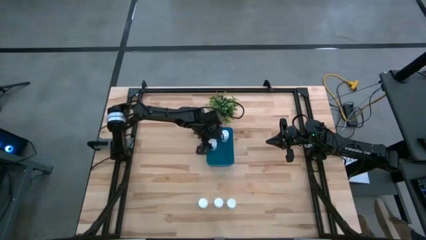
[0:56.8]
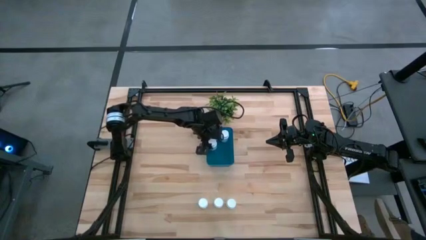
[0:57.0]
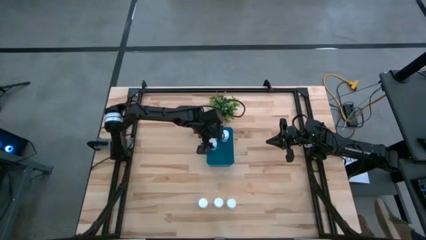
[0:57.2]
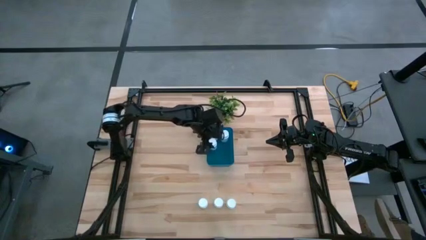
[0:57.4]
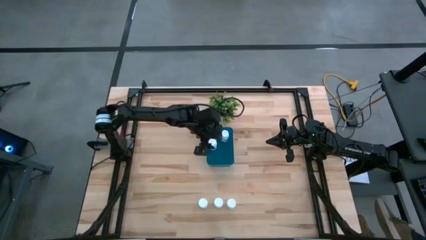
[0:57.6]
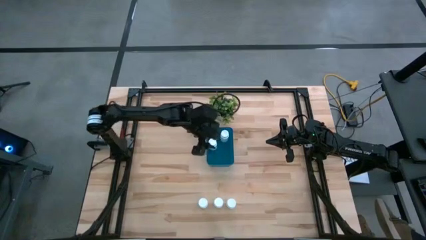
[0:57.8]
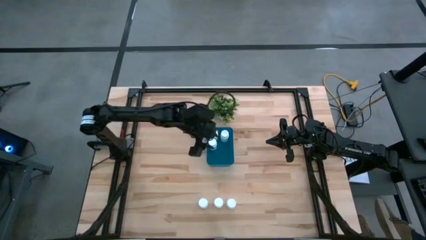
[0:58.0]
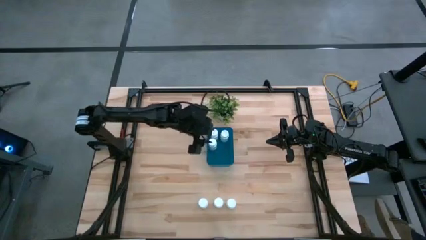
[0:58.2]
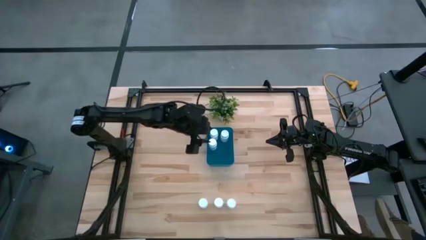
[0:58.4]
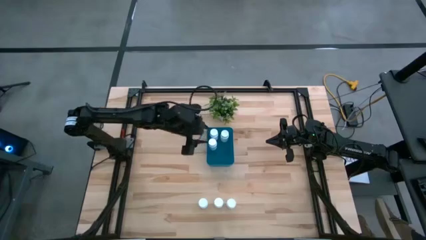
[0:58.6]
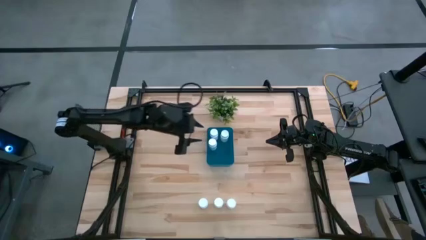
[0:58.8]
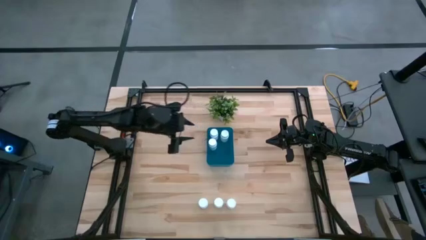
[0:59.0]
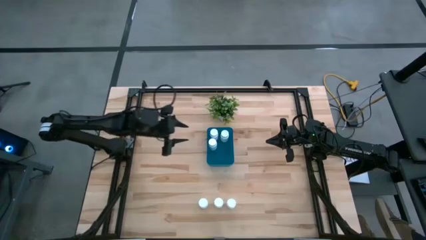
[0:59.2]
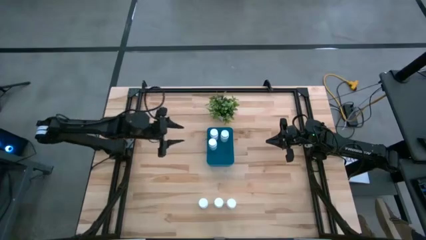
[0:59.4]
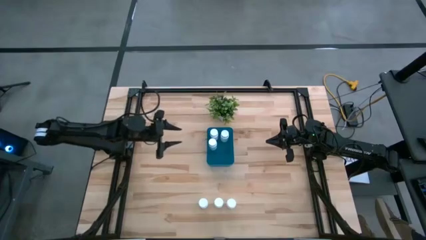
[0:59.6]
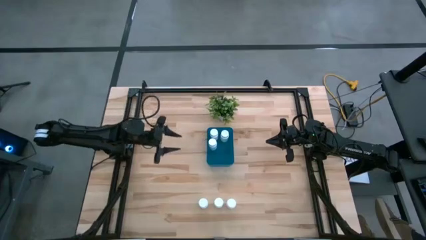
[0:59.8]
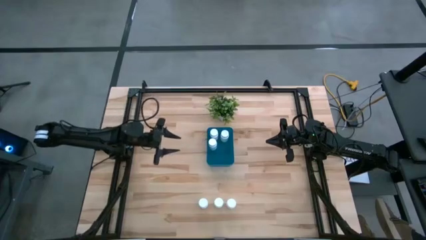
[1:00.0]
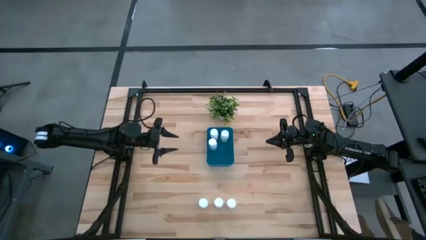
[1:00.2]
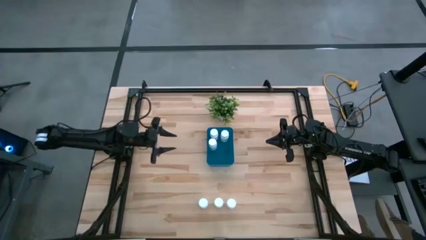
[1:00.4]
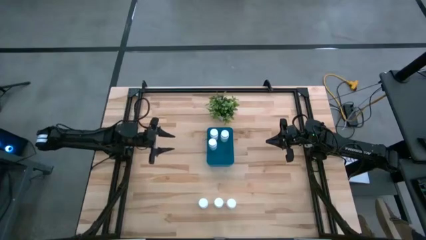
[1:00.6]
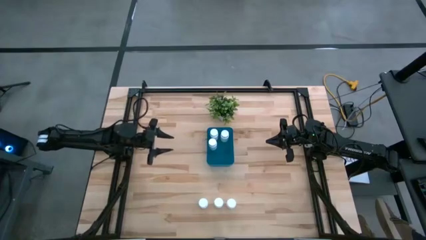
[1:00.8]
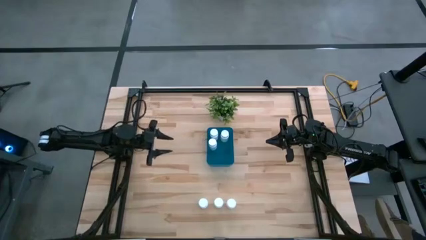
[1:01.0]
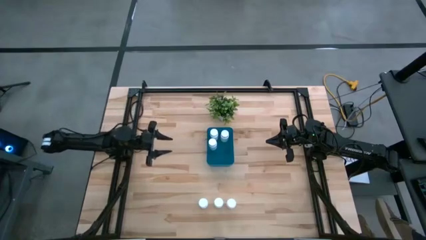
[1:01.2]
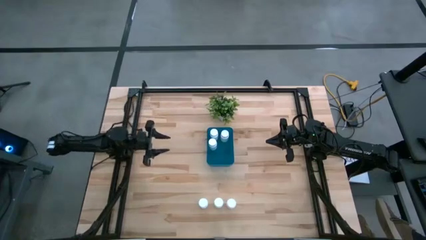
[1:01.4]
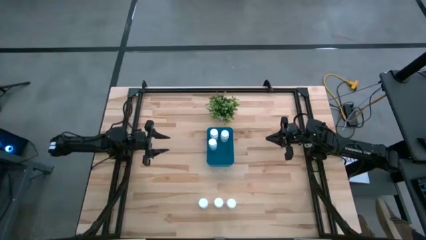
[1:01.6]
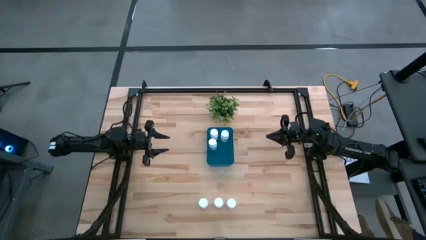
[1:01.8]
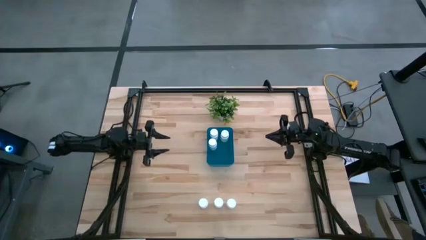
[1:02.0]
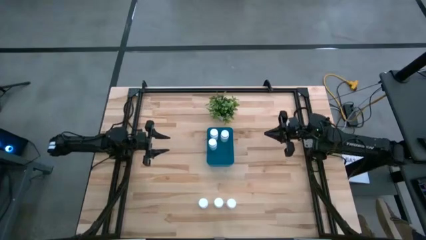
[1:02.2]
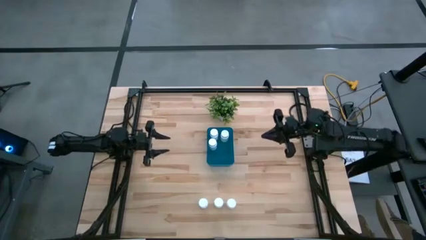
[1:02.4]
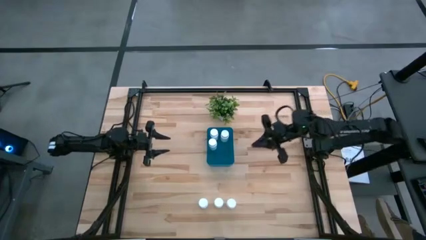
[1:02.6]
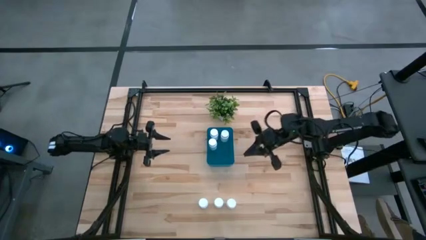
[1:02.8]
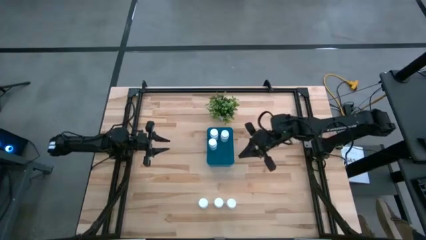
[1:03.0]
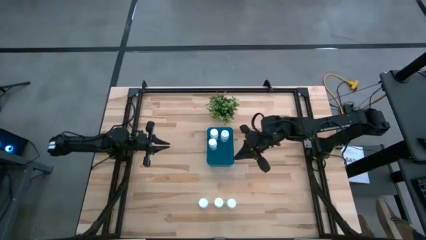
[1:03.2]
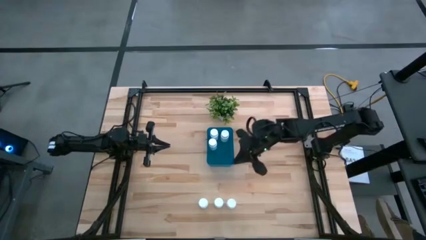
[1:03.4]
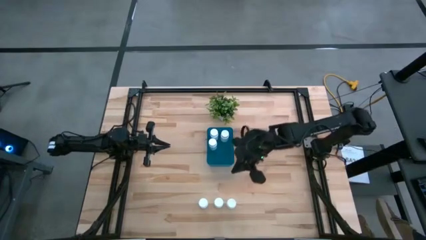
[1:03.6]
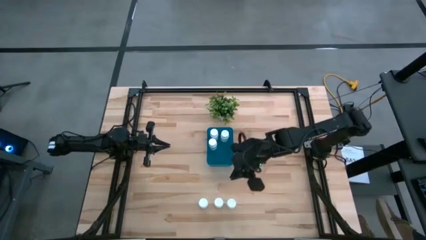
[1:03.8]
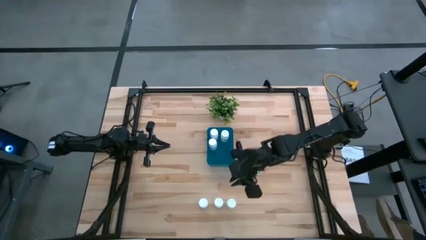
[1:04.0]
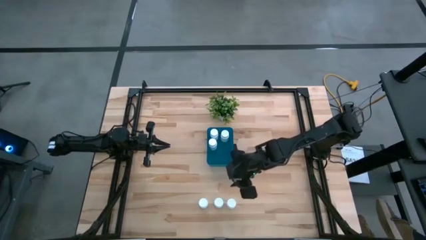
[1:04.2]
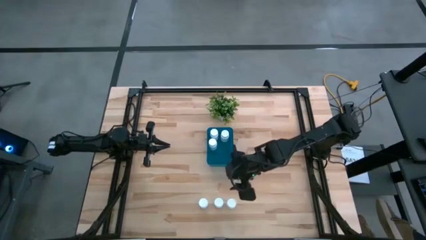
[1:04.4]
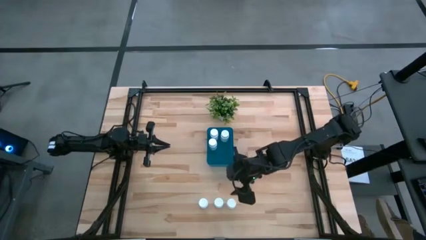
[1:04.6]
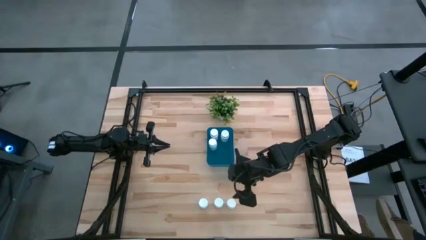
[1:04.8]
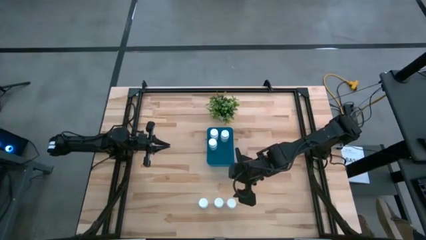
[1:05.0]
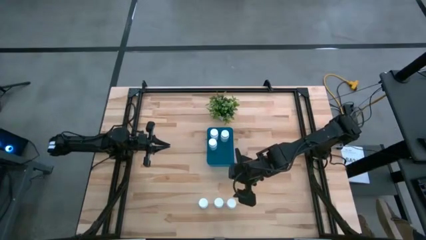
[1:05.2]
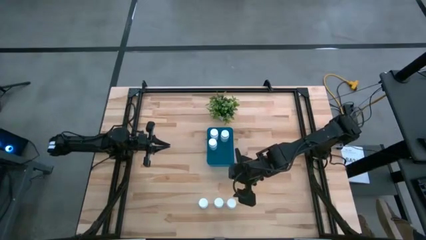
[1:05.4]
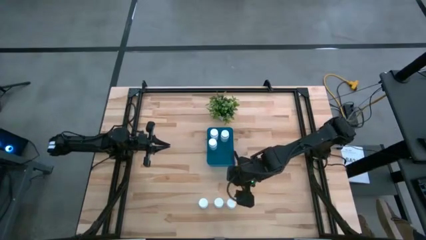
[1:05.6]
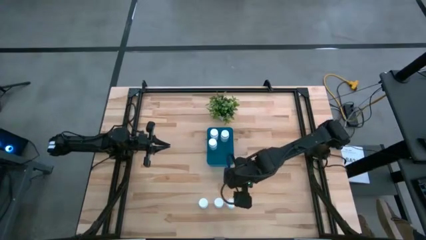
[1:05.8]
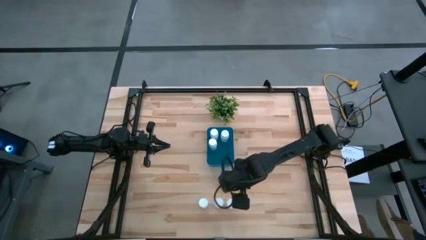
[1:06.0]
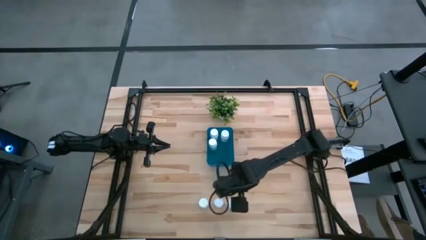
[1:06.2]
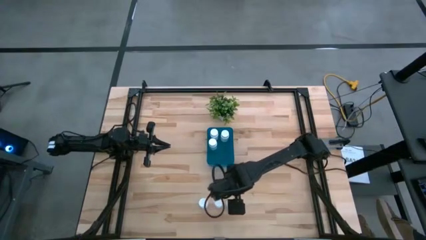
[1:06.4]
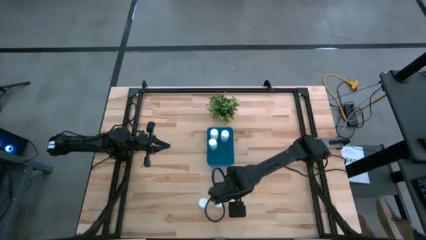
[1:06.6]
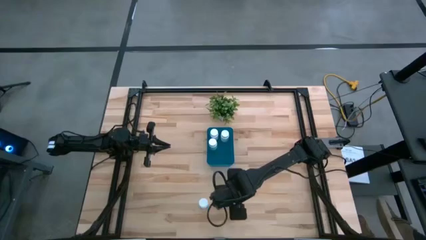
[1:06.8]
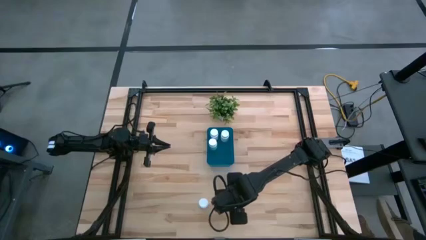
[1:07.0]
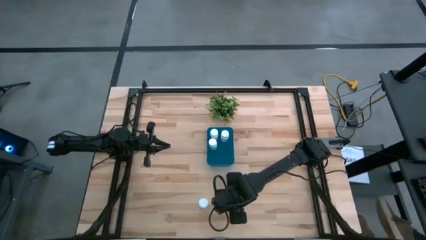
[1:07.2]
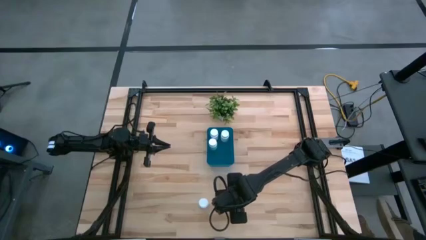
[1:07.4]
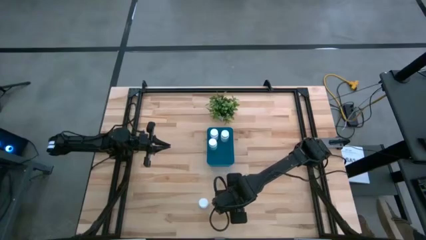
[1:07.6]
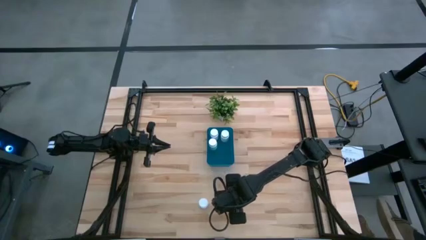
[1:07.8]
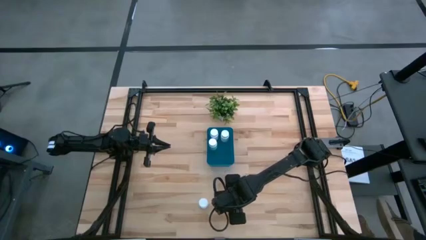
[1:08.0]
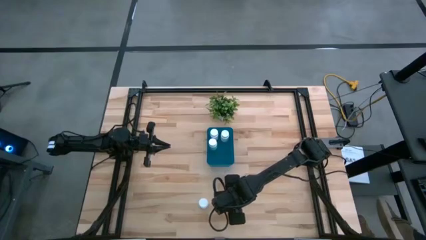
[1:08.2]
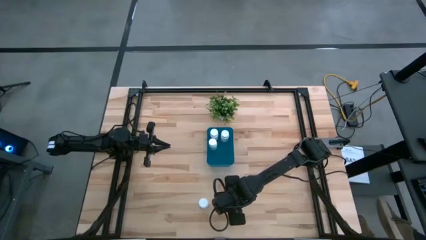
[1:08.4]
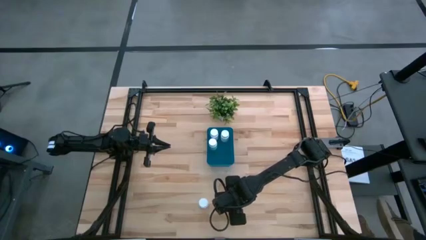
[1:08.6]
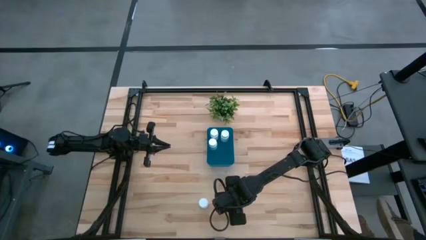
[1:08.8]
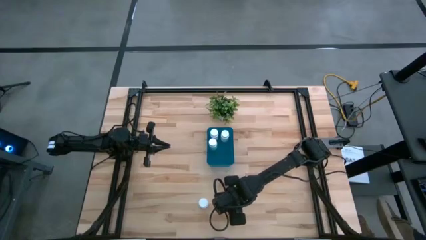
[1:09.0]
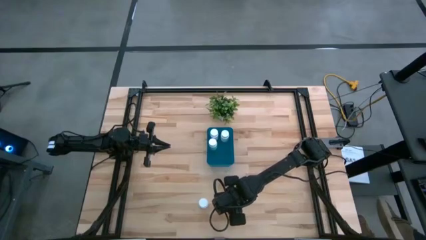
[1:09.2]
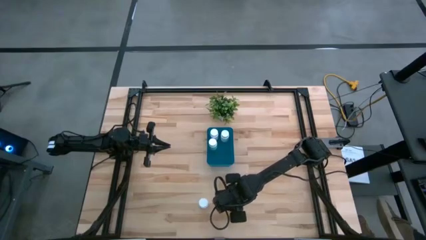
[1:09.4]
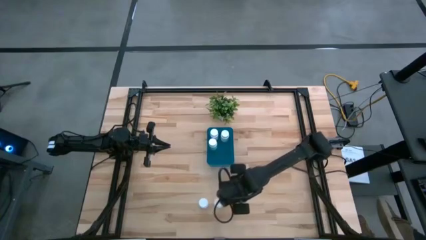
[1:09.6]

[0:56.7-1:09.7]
Task: Pick and place pill bottles into a basket
Put the white pill bottle into the blue bin
